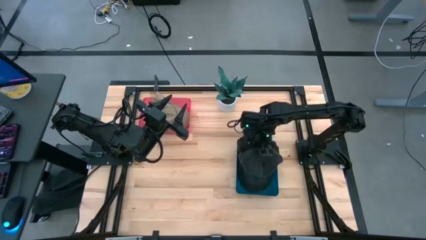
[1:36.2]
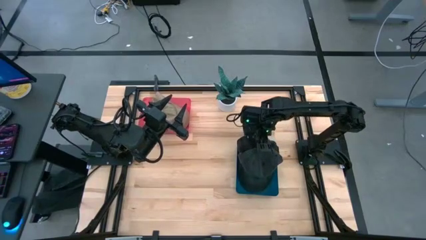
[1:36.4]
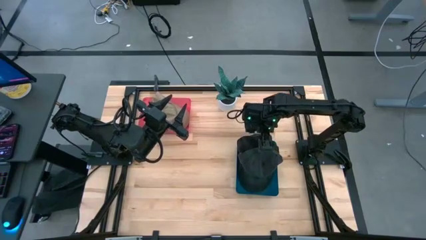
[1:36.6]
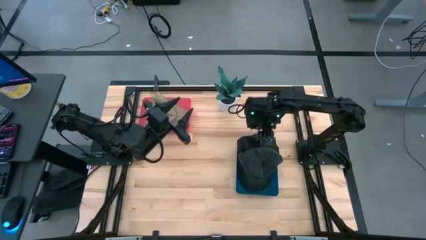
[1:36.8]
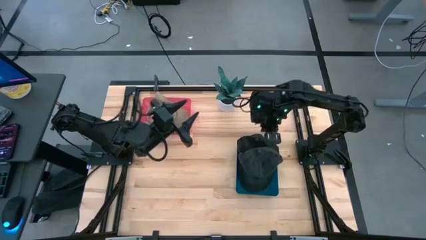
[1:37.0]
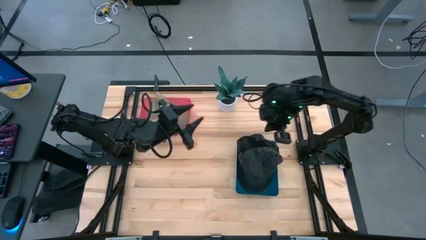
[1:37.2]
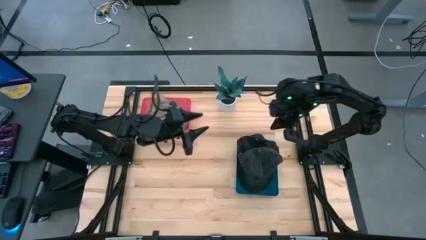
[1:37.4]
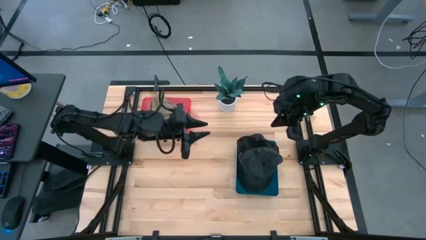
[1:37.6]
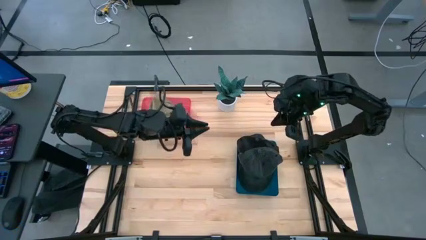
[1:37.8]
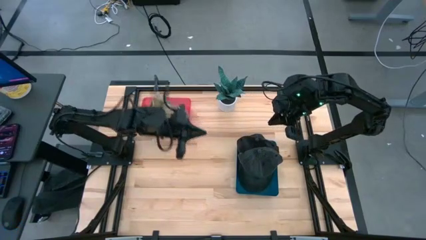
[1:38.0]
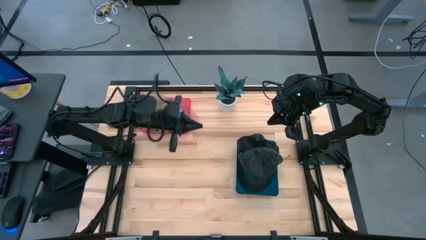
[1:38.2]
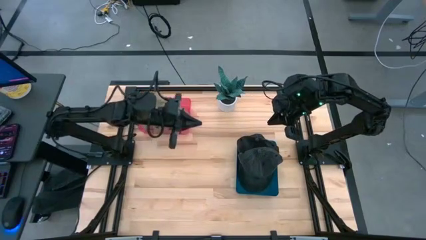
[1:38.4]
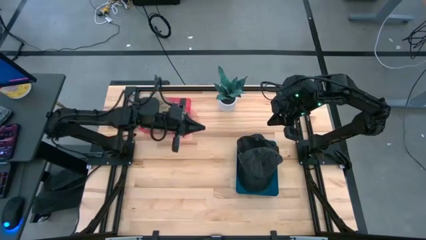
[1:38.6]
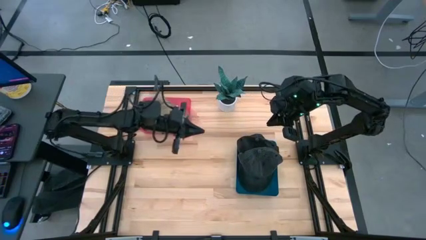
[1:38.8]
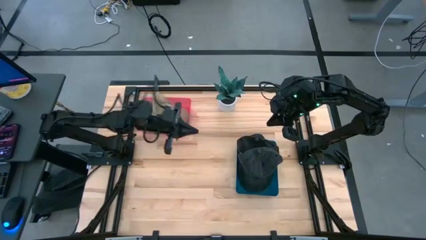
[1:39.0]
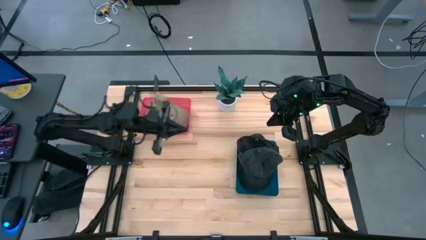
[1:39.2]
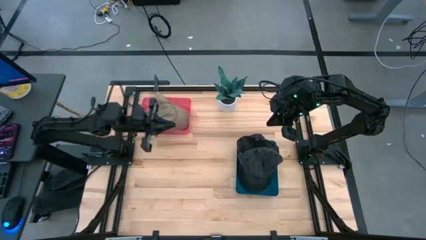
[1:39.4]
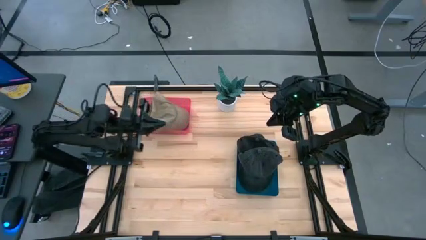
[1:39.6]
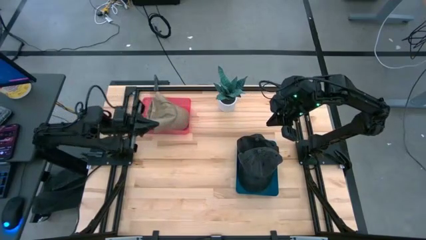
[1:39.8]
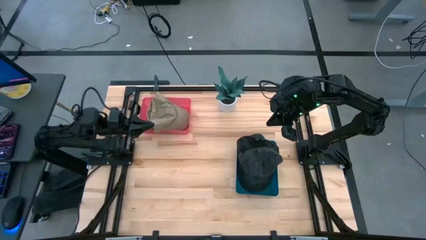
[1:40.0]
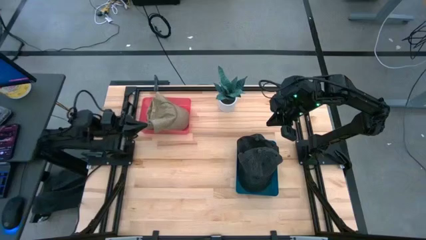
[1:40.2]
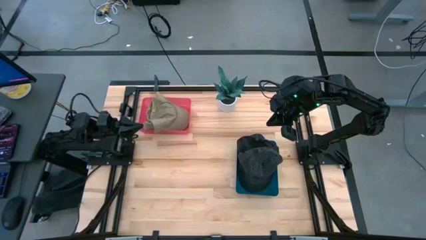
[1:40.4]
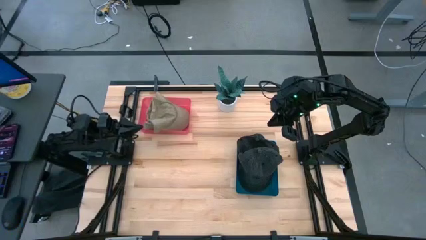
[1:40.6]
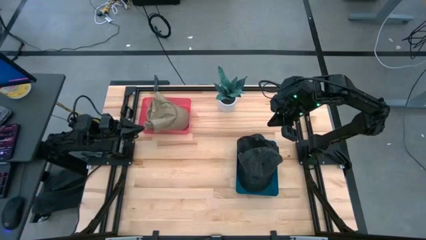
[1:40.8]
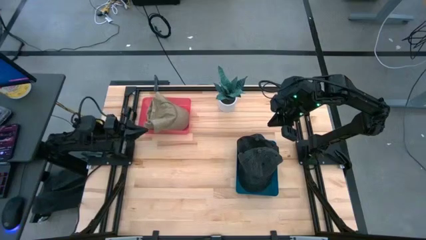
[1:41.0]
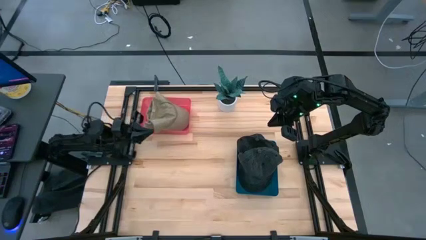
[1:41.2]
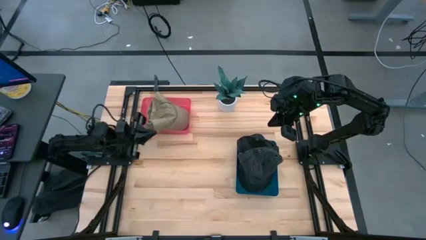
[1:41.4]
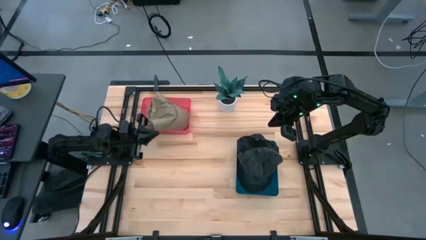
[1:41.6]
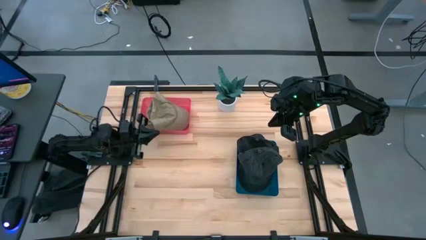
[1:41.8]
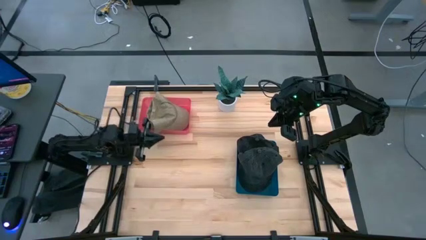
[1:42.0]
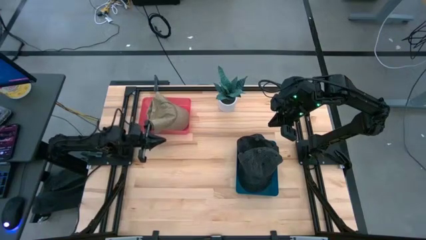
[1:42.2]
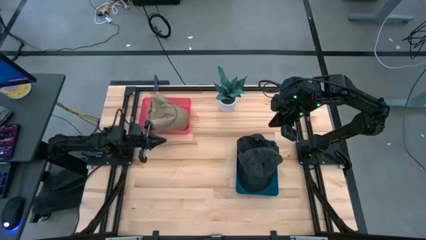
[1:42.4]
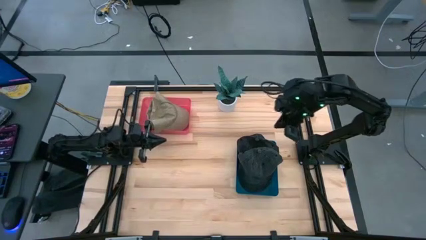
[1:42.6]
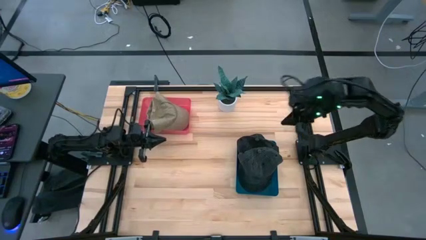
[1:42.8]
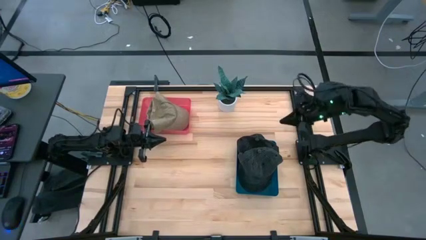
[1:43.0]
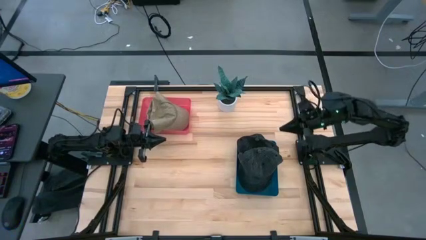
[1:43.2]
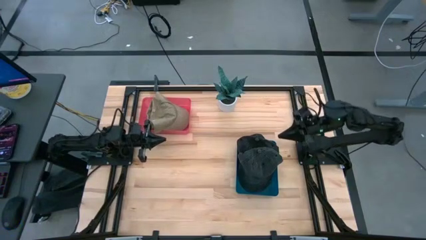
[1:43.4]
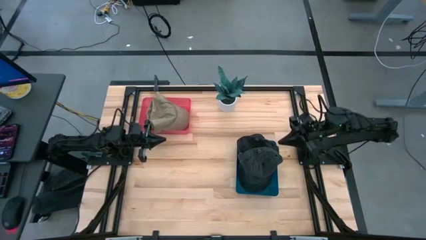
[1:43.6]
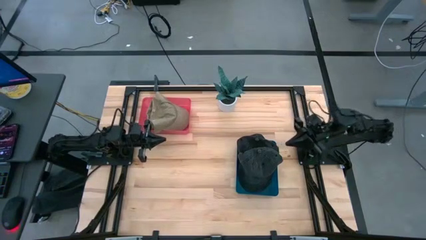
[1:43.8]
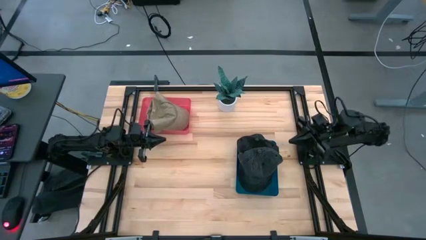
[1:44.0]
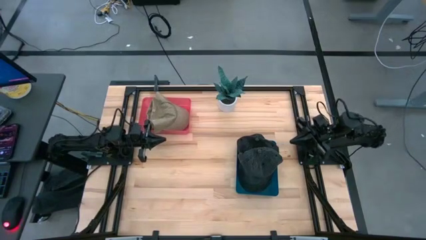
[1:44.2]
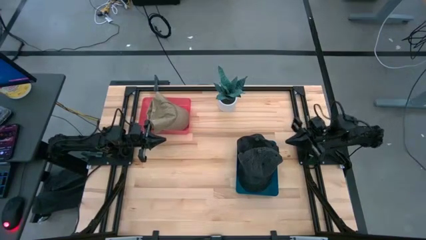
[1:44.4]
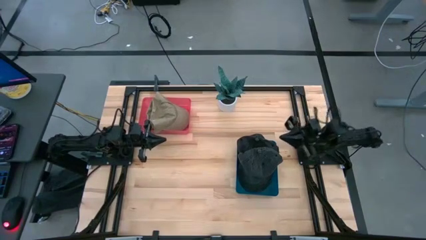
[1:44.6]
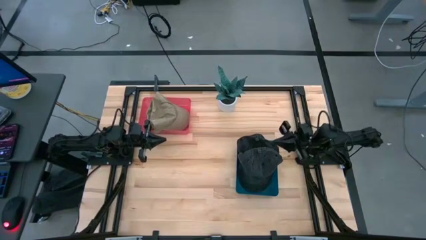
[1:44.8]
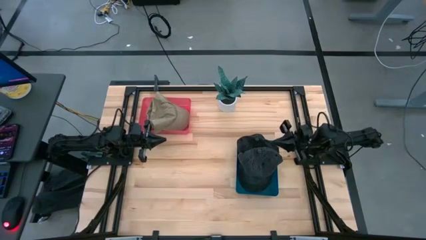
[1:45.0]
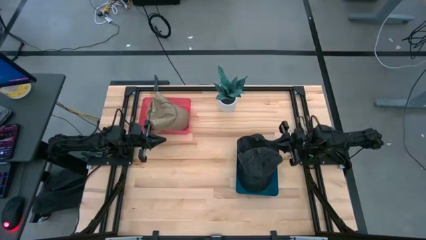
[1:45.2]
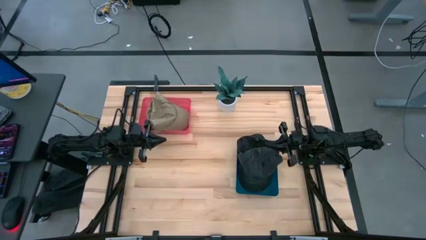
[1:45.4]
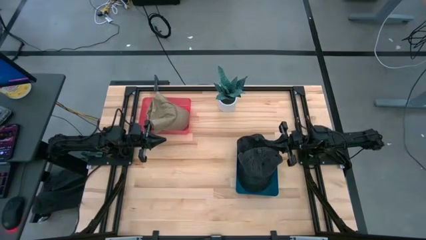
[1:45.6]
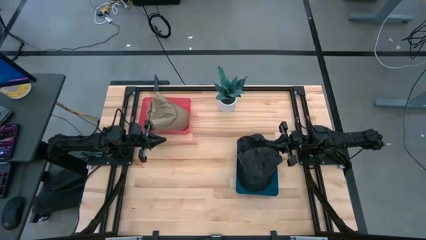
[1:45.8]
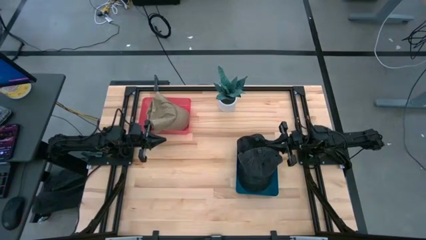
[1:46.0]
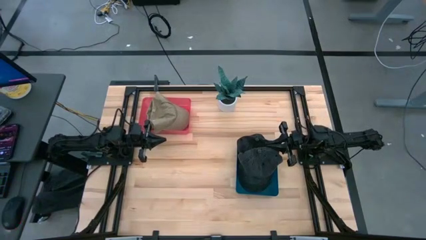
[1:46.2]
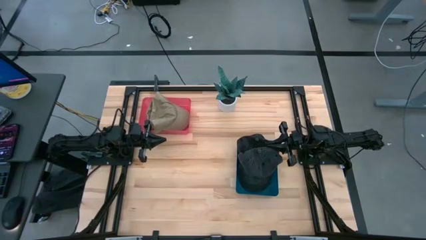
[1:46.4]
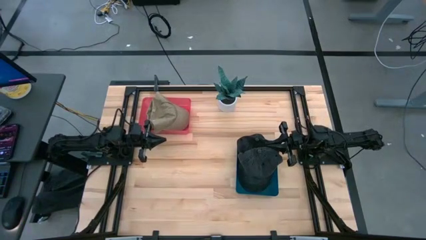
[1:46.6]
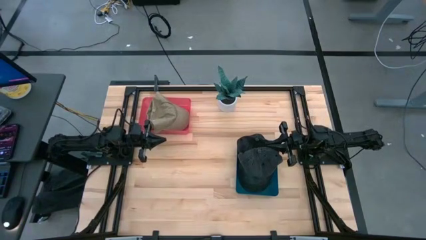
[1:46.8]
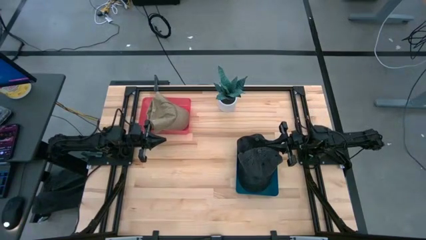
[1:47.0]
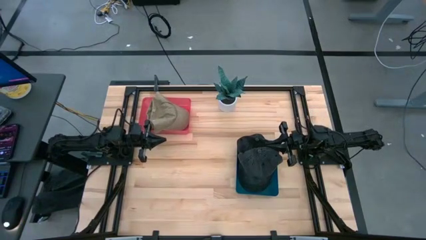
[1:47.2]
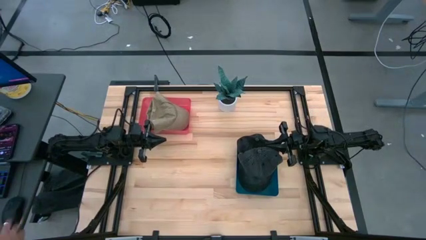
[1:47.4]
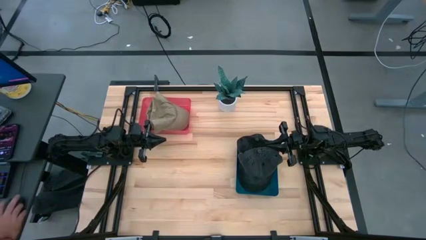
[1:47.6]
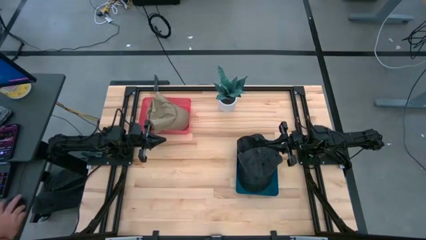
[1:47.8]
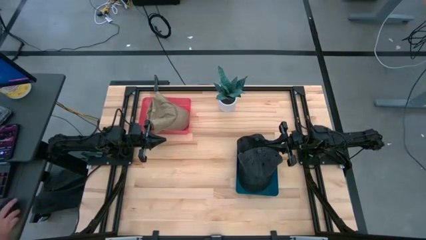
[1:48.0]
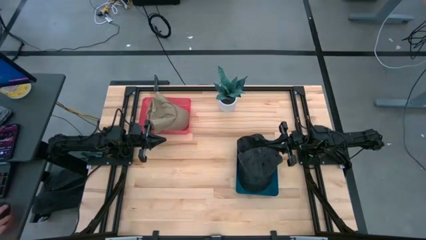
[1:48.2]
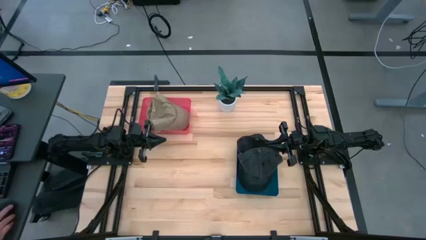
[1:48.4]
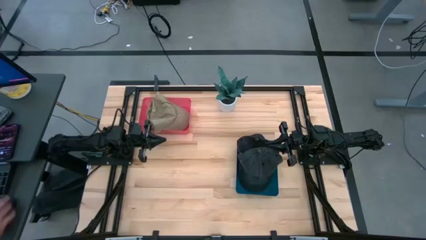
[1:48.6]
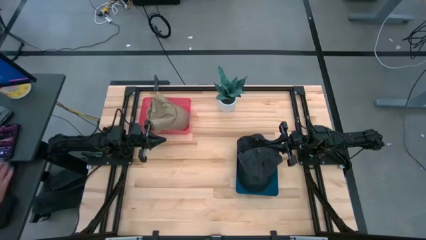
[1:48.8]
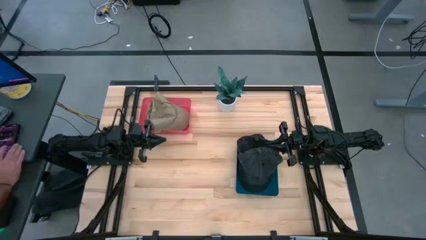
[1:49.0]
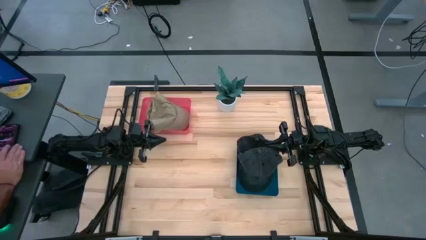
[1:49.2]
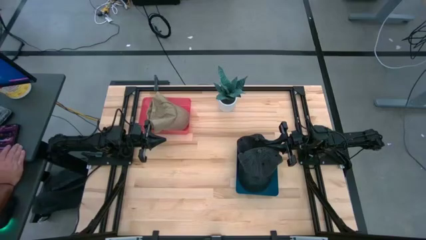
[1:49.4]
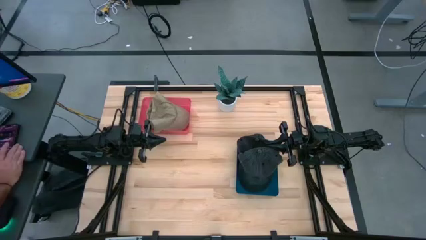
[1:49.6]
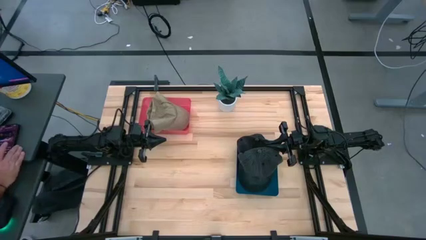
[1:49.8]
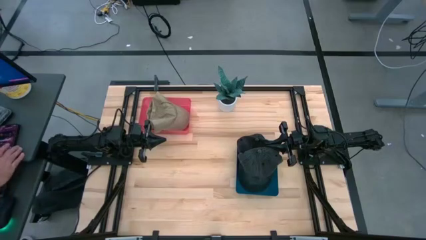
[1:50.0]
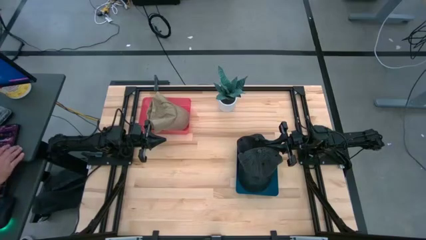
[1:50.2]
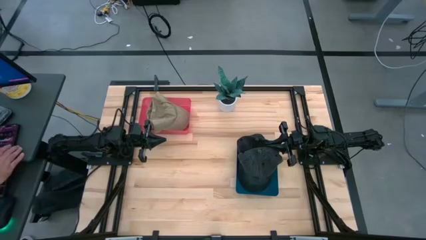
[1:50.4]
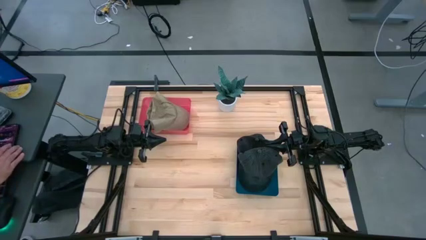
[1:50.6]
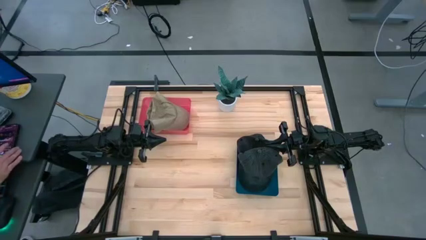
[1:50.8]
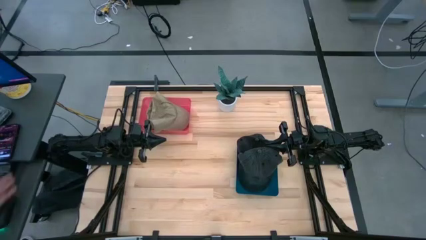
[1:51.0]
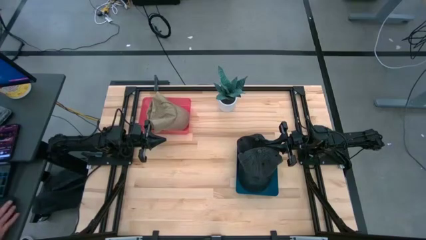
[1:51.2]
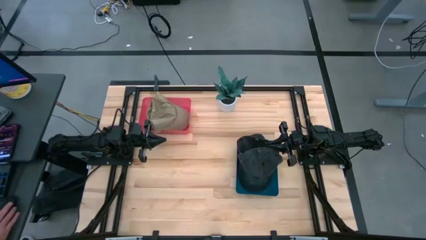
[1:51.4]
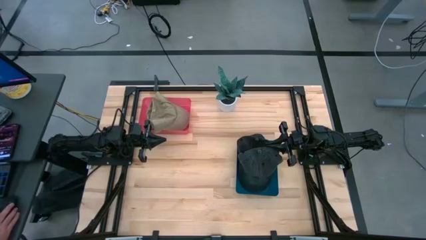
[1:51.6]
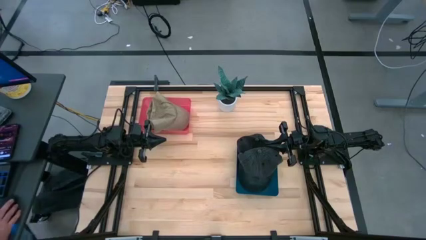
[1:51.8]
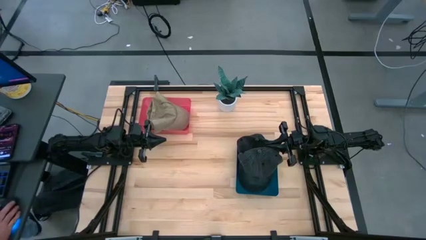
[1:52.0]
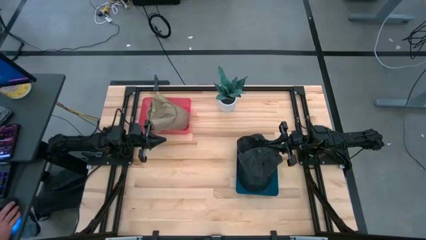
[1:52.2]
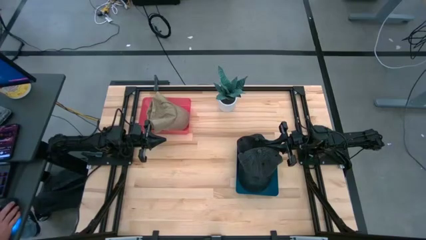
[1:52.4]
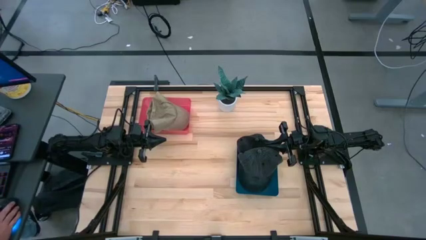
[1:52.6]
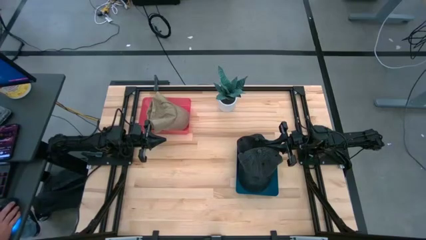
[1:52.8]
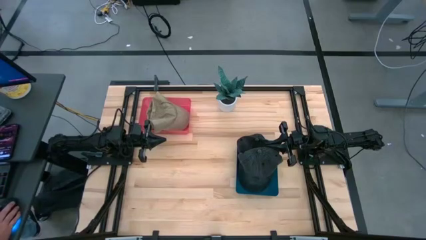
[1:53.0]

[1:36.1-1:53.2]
Task: Pick & Place hat
Return to Home Position
